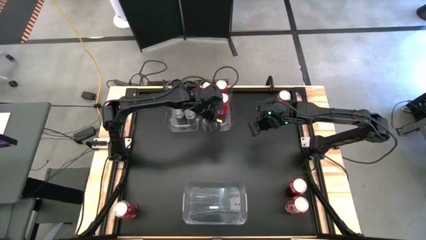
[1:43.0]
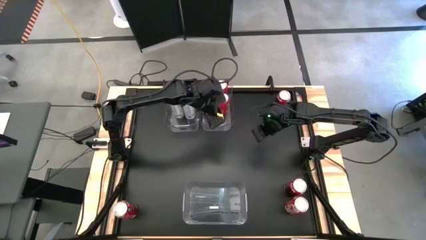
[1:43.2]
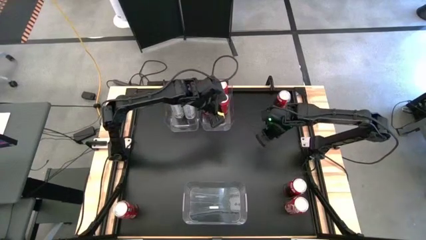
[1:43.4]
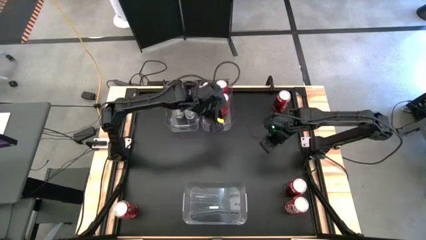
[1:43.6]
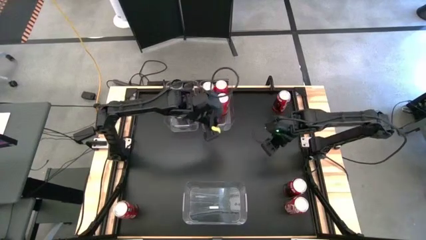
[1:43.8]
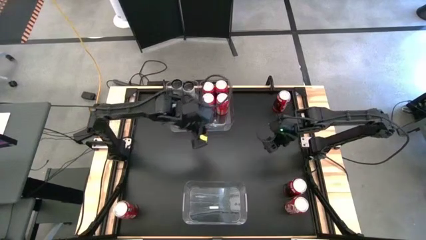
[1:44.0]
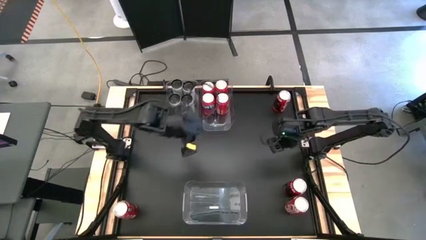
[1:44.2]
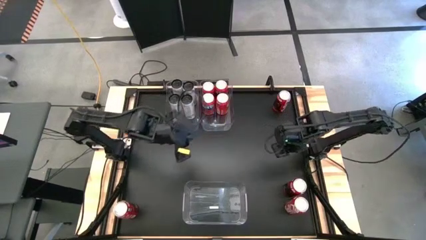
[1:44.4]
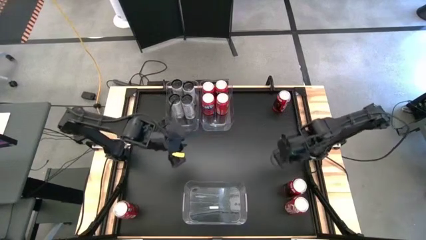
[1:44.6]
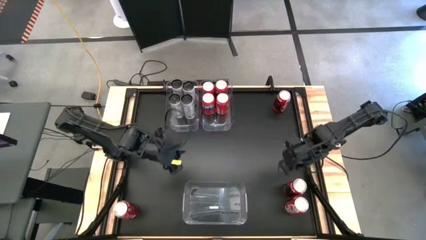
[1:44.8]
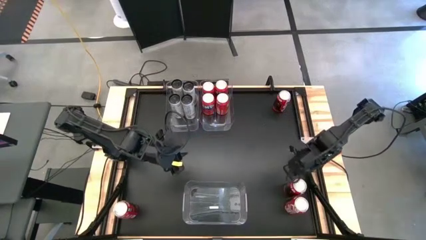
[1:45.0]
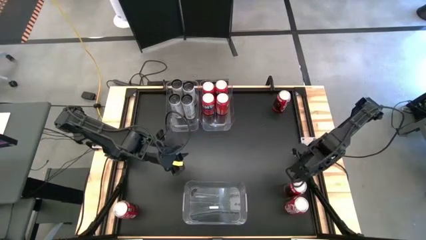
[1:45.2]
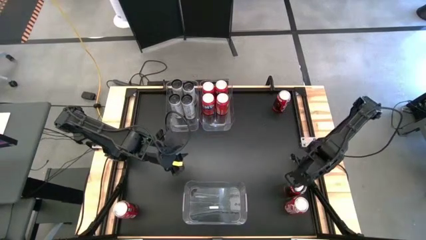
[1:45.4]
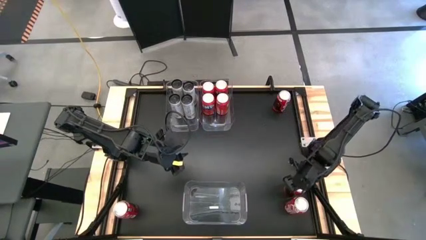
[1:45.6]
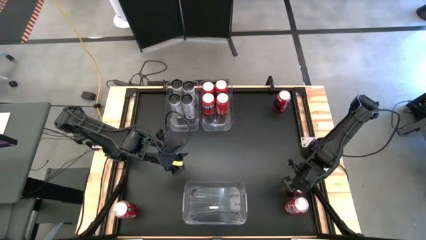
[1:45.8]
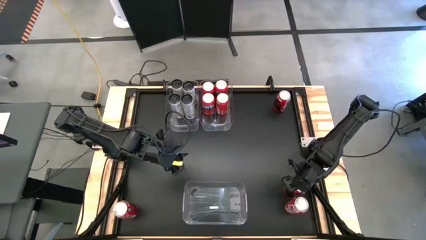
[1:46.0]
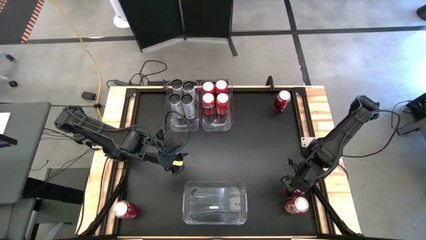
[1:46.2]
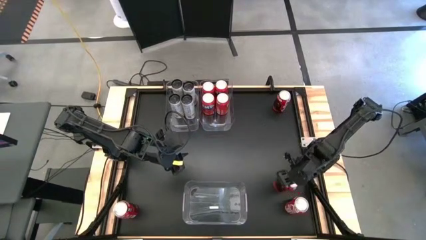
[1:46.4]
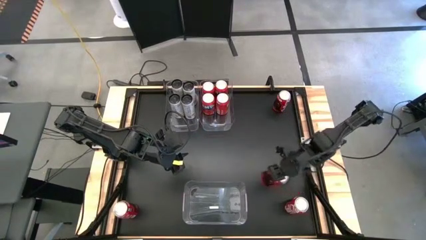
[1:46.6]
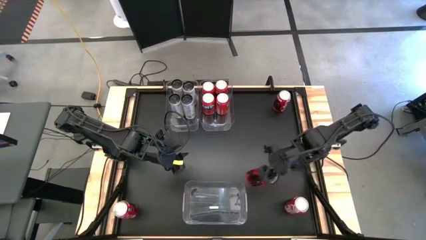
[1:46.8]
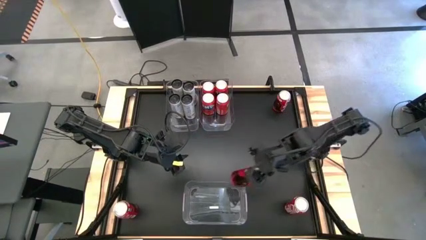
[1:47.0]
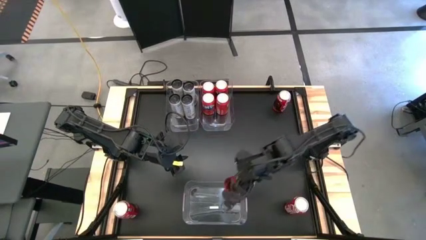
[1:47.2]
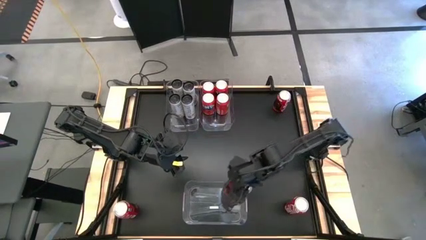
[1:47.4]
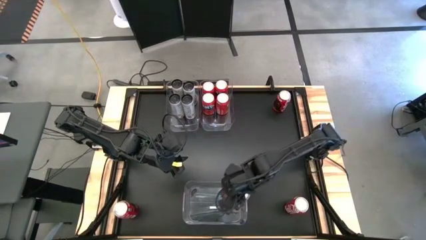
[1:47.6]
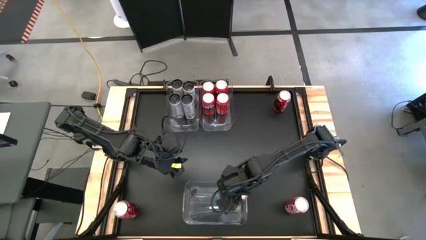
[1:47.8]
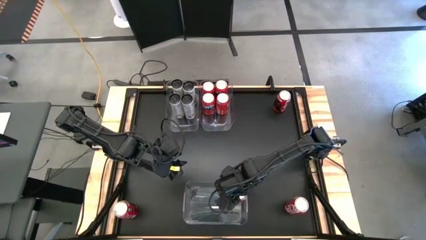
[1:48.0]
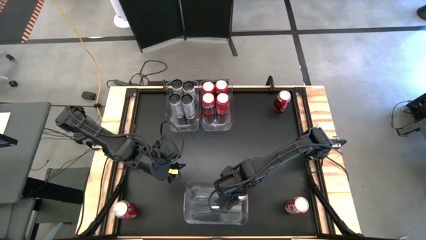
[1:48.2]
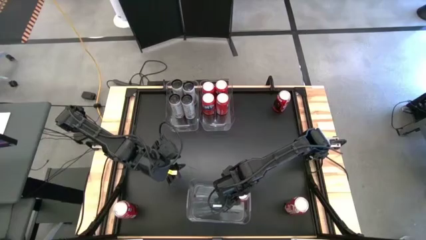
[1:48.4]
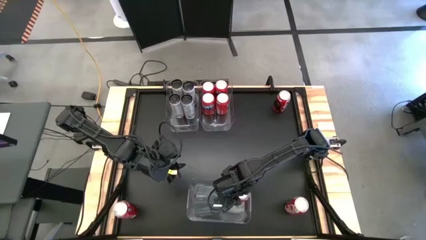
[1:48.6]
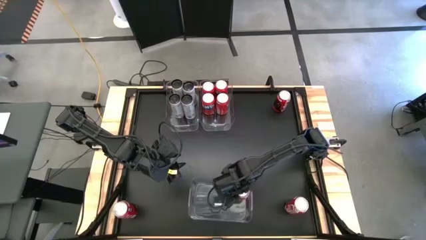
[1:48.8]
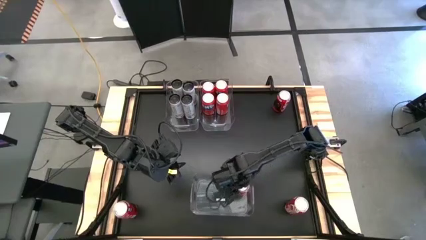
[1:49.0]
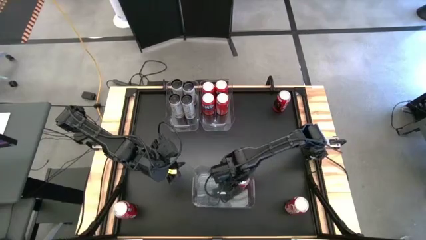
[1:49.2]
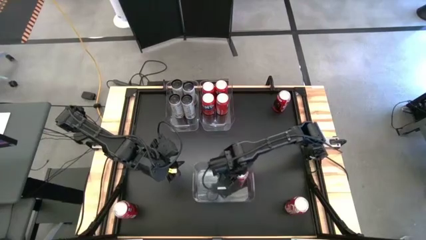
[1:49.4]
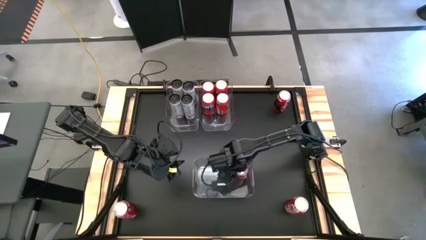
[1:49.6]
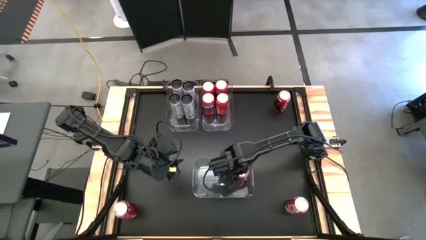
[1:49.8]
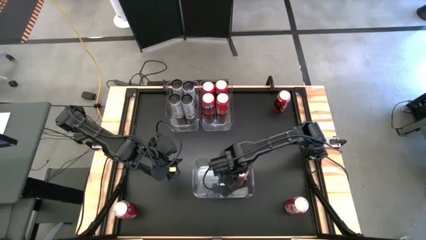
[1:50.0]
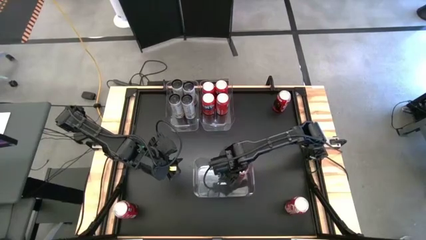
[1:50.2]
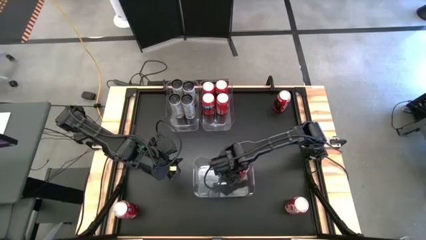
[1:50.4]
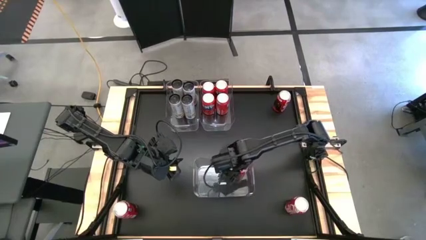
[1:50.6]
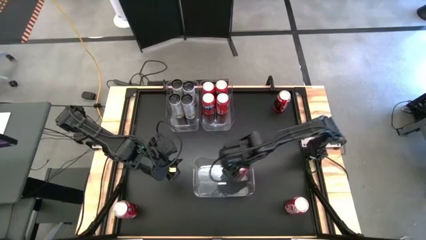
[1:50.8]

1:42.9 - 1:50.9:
Task: Sort soda cans
Put the bottom right red soda can into the bottom transparent bin

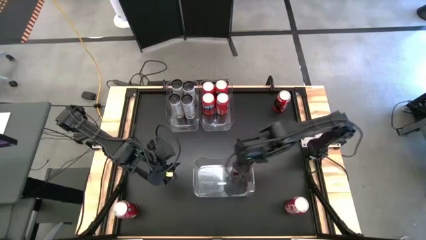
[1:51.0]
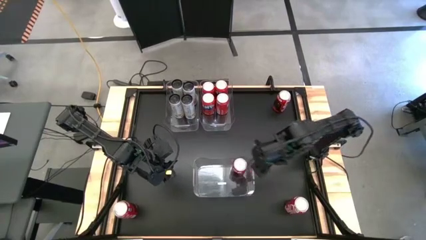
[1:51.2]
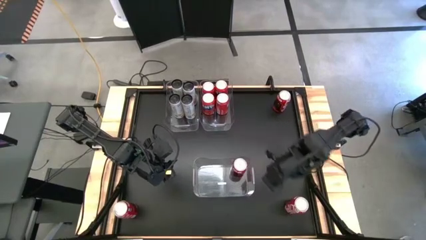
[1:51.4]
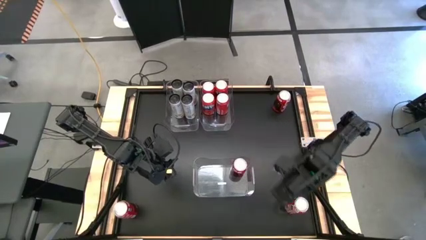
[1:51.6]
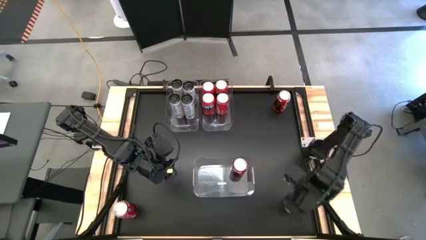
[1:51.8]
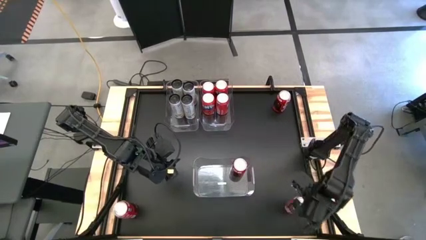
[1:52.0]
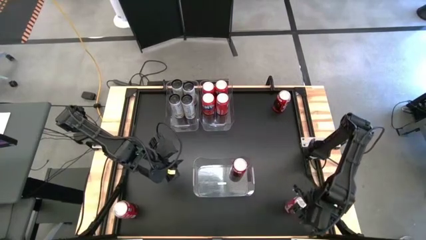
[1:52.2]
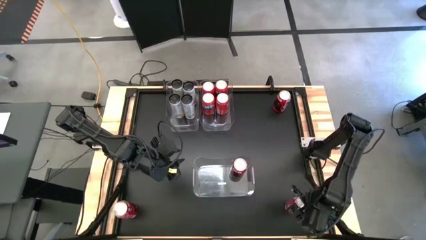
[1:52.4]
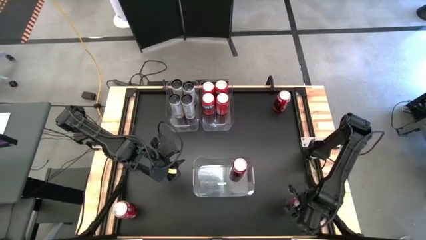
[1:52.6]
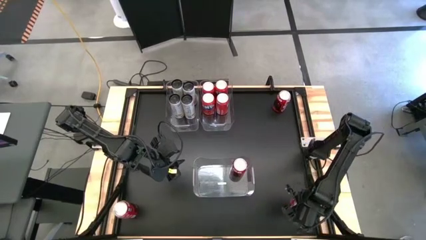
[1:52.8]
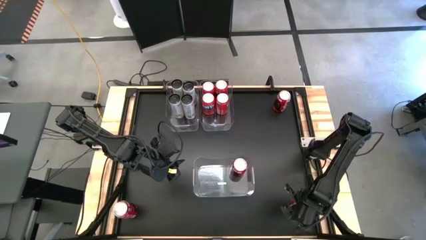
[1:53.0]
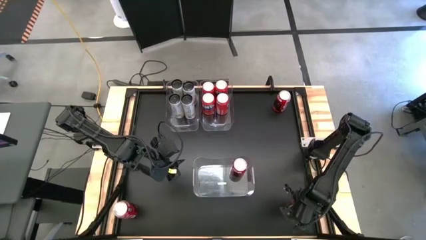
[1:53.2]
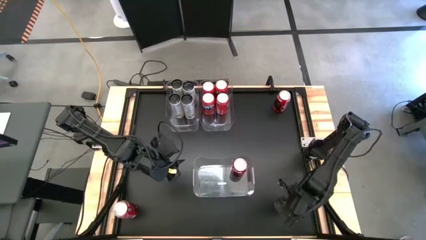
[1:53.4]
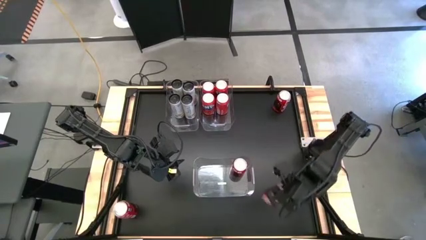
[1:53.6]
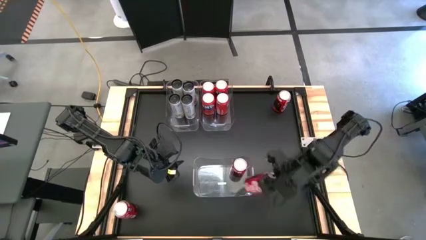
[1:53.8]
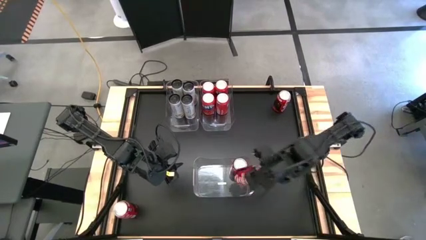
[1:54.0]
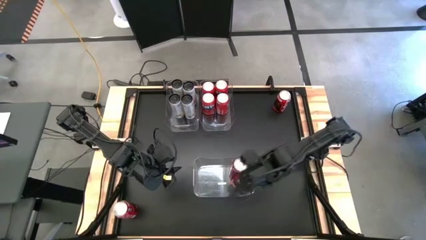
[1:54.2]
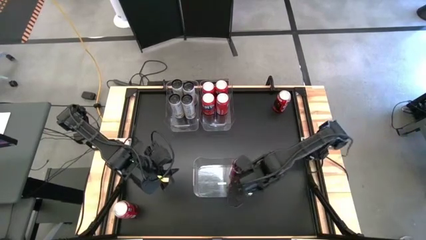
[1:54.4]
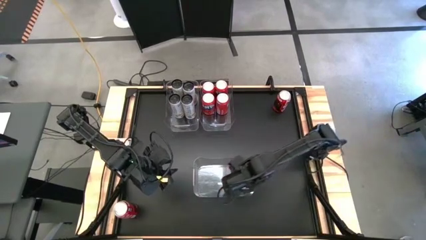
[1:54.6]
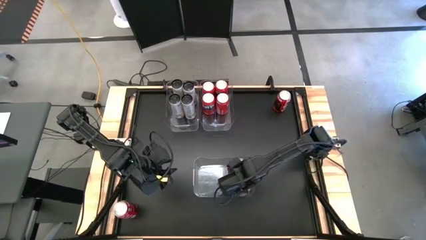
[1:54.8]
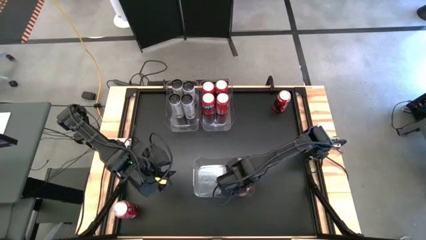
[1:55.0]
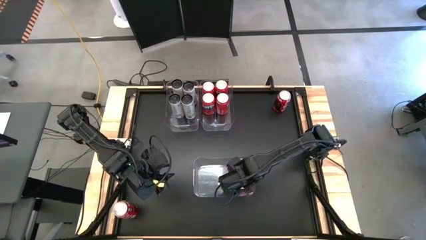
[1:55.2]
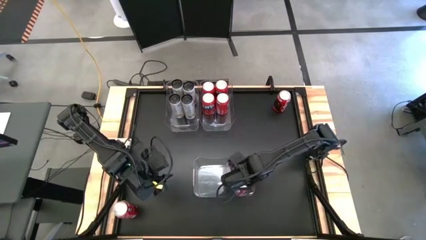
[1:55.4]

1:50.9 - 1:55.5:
Put the bottom right red soda can into the bottom transparent bin
